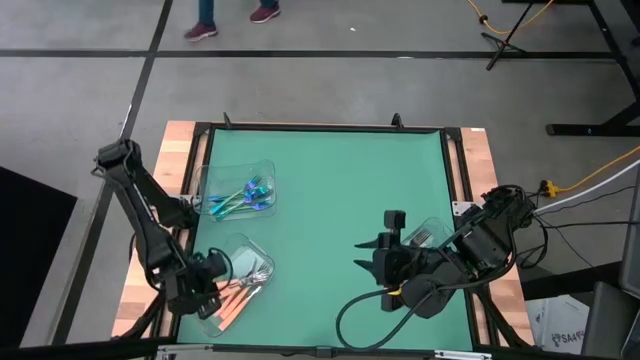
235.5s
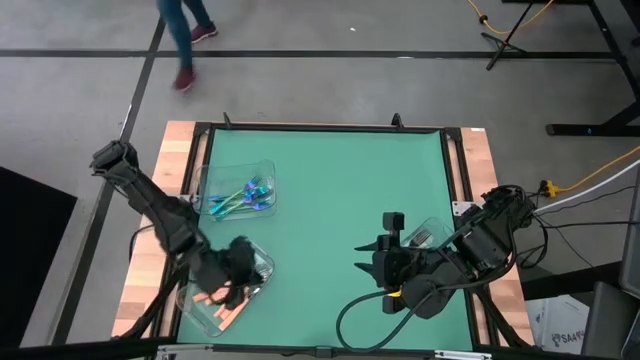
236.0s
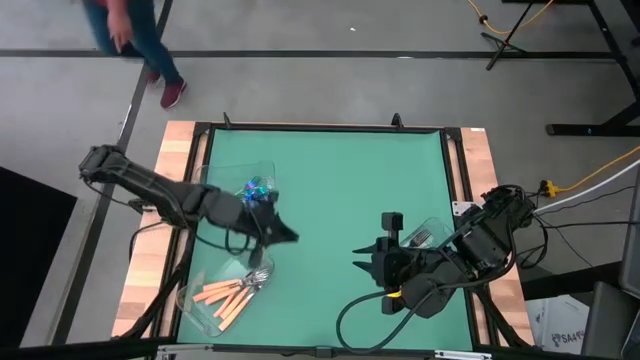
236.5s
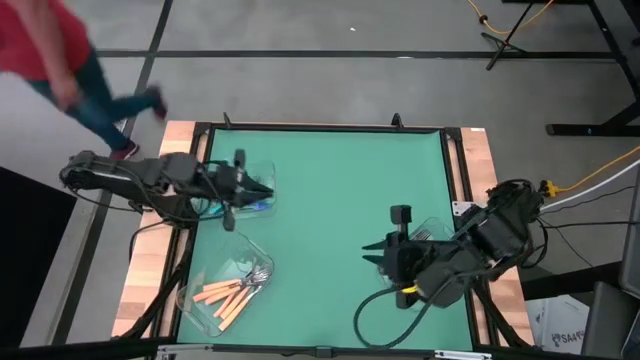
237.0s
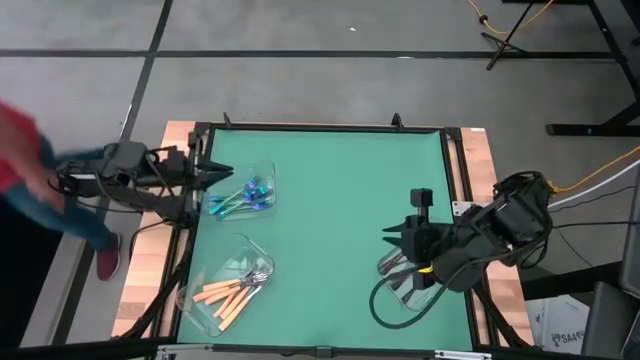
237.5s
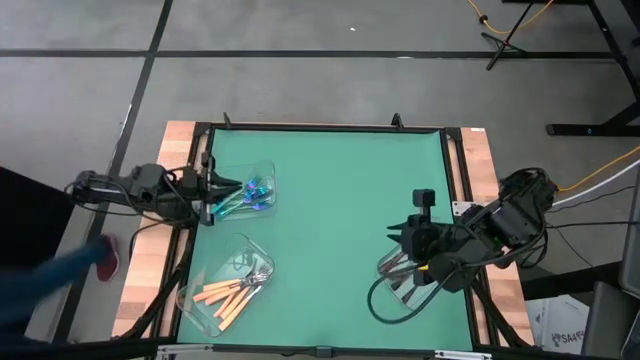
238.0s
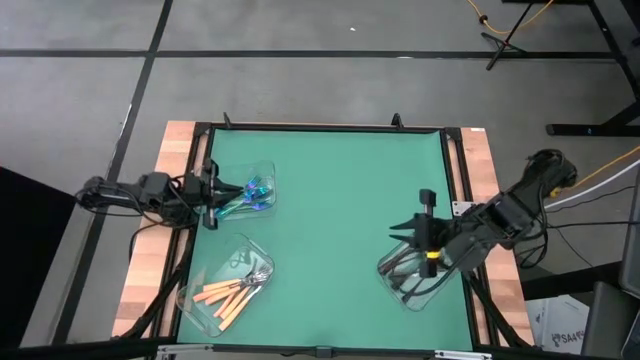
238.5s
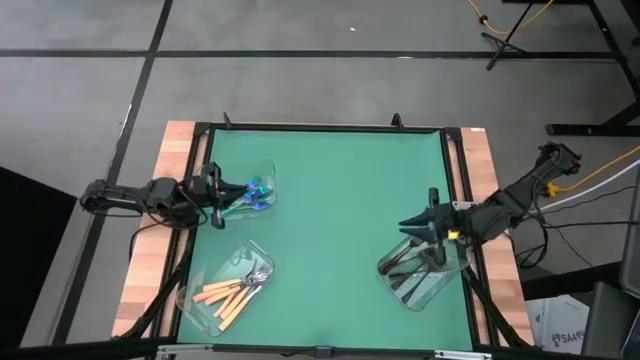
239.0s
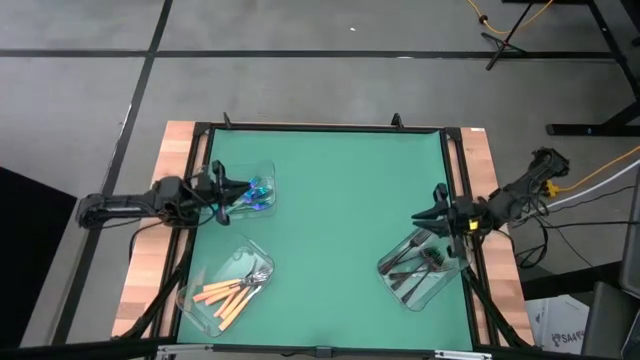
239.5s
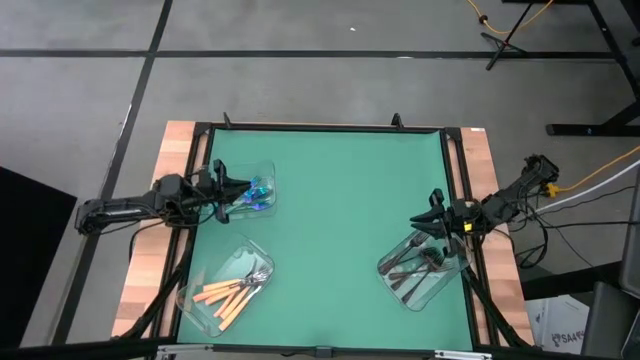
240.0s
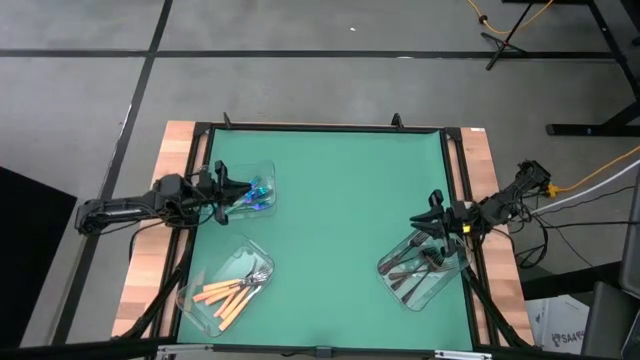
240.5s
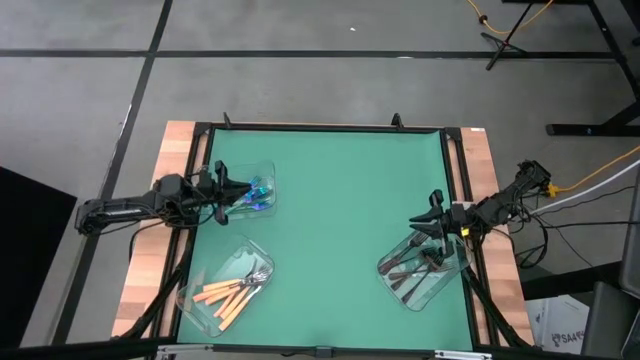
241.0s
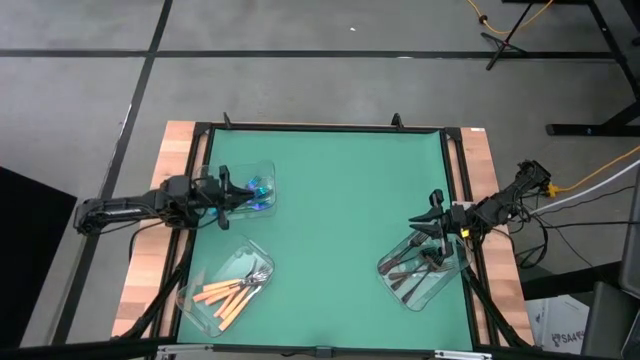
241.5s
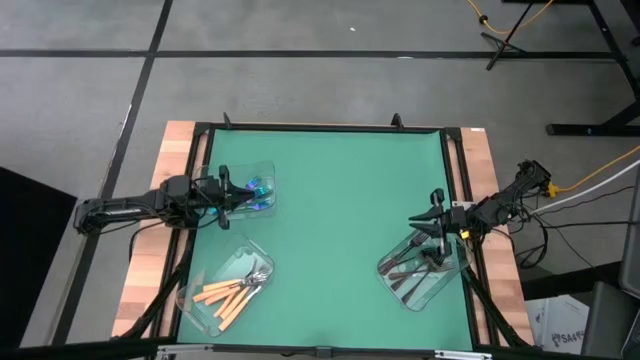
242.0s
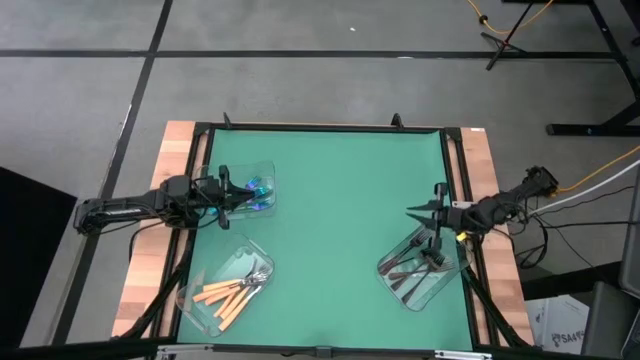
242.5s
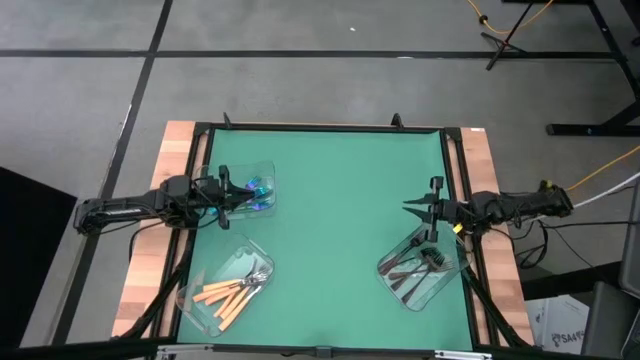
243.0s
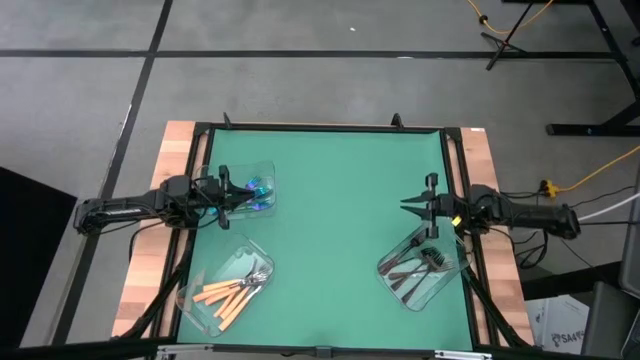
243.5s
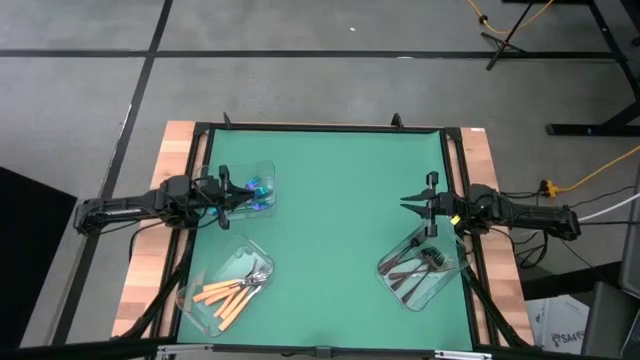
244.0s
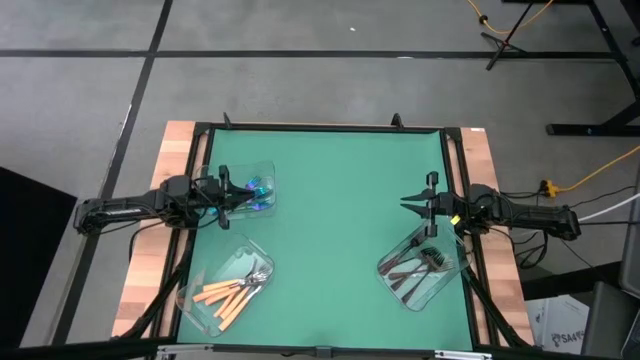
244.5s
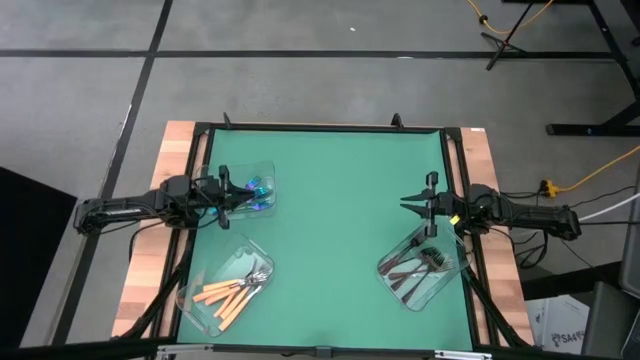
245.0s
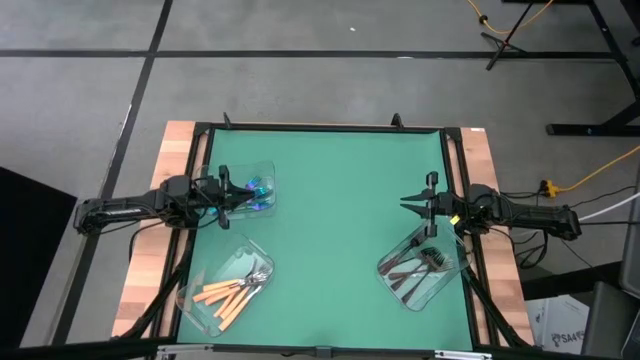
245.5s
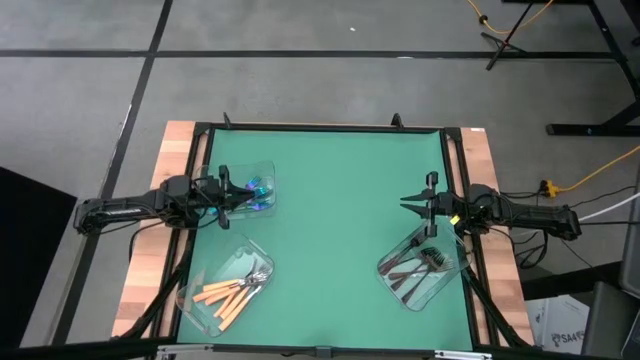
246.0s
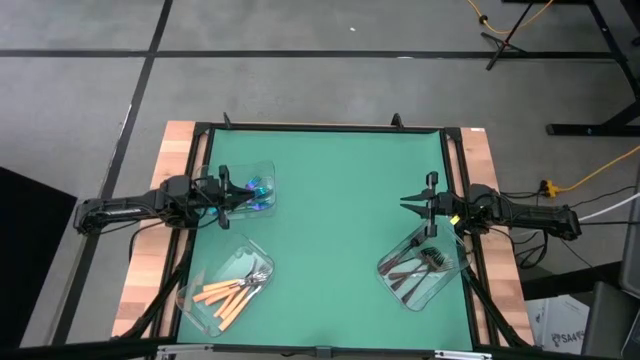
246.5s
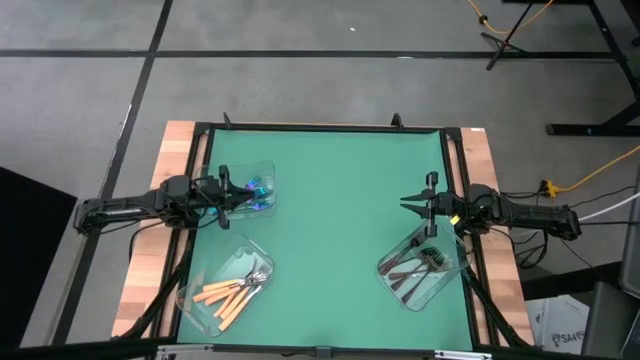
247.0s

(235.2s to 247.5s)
Task: Sort silverware by color (type)
Return to Home Position

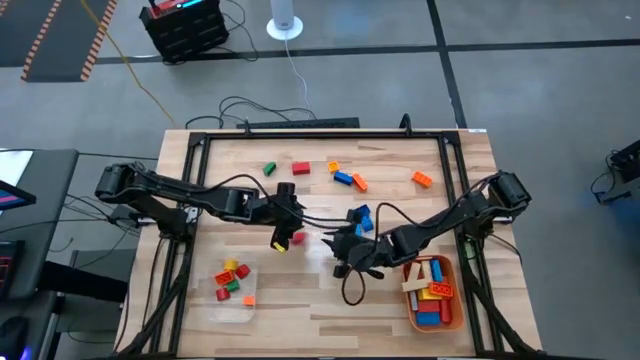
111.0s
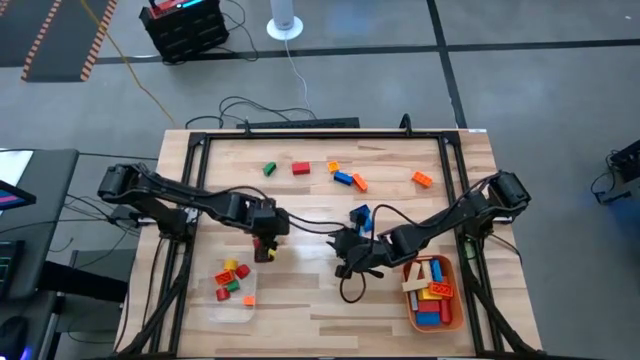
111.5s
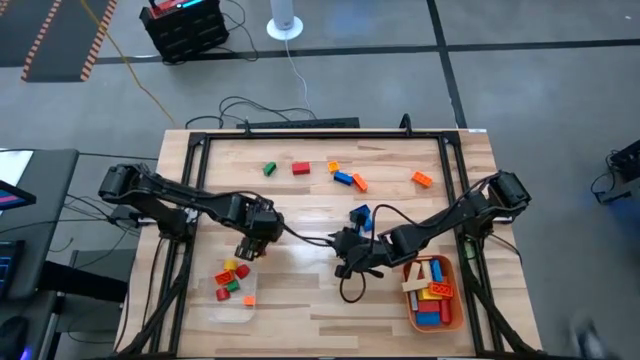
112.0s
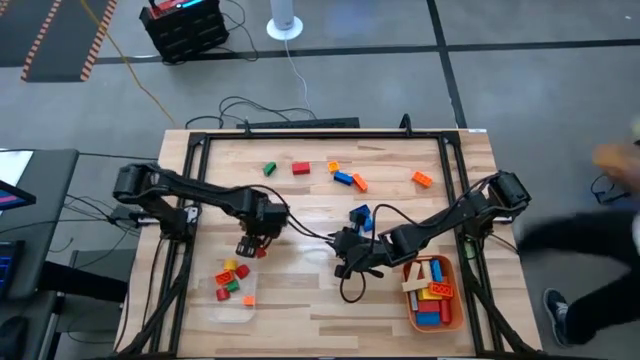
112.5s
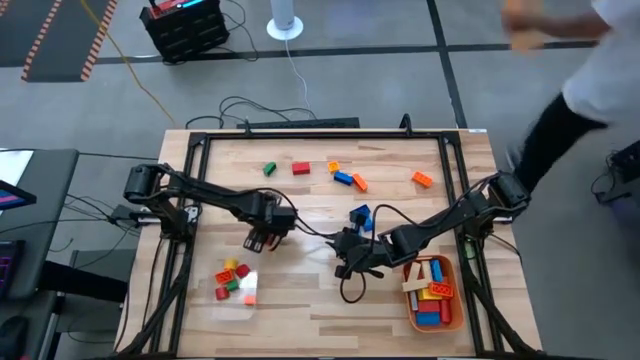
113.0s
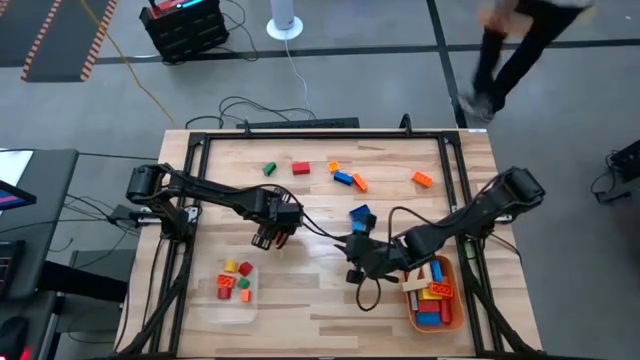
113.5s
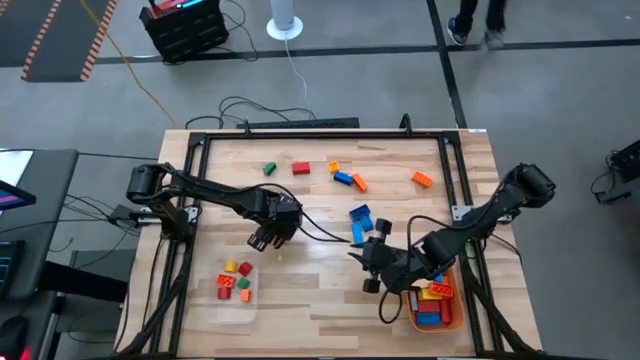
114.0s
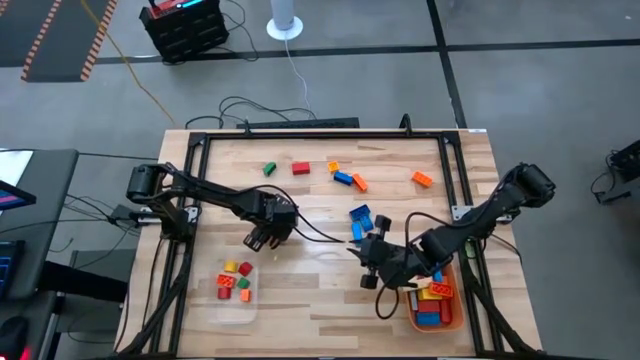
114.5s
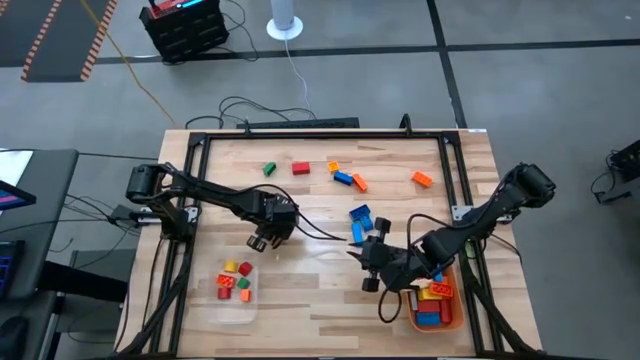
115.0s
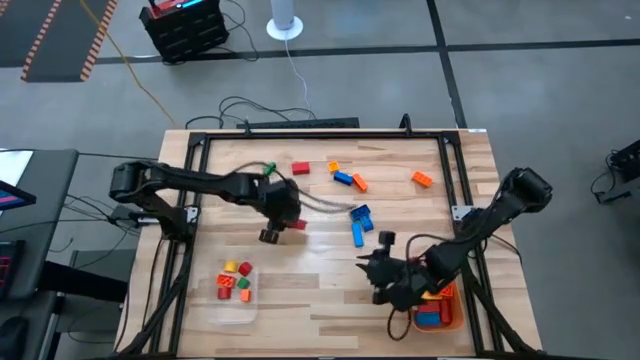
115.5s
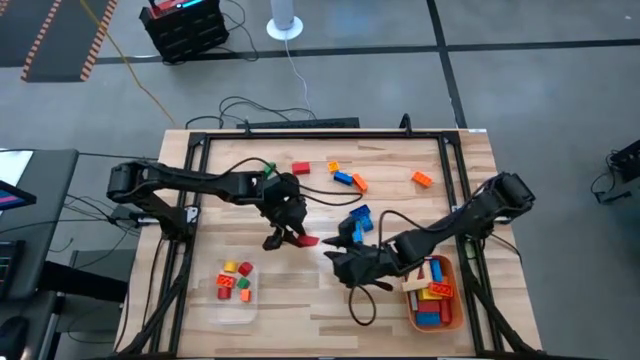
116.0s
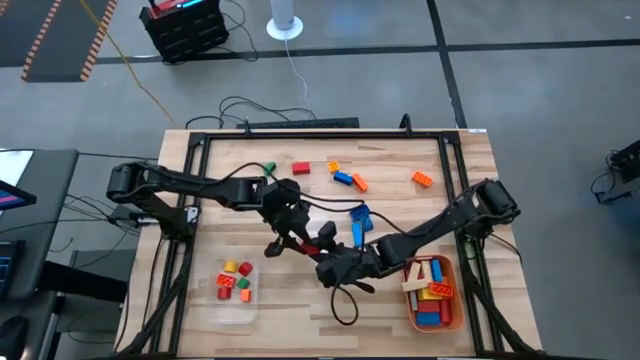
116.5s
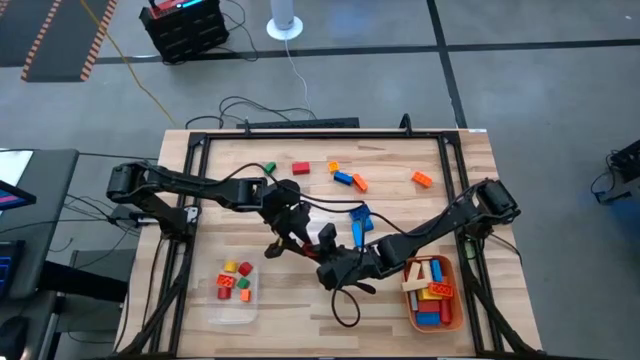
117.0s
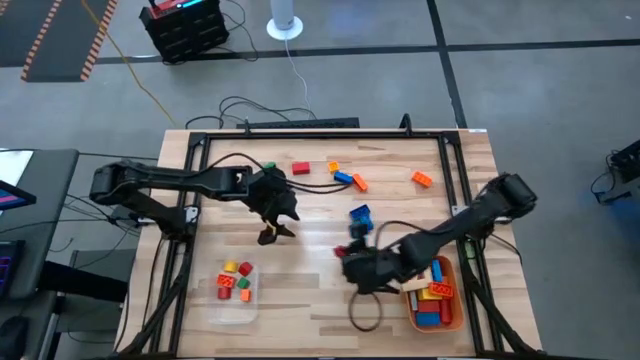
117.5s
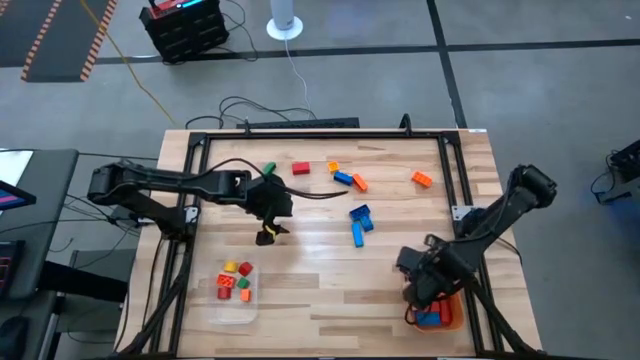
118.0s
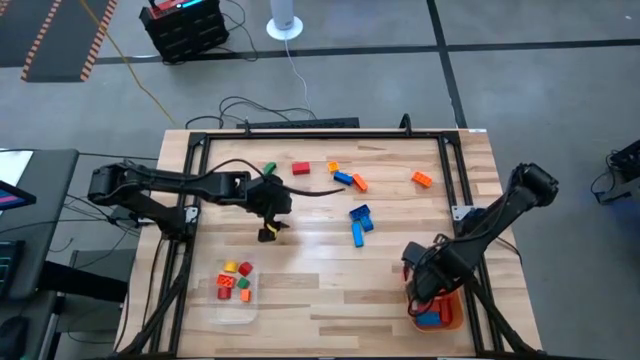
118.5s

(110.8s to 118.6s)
Task: Sort blocks by size
Put the large red block into the orange bin
